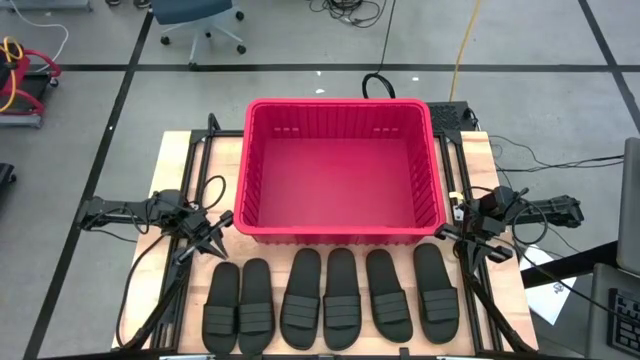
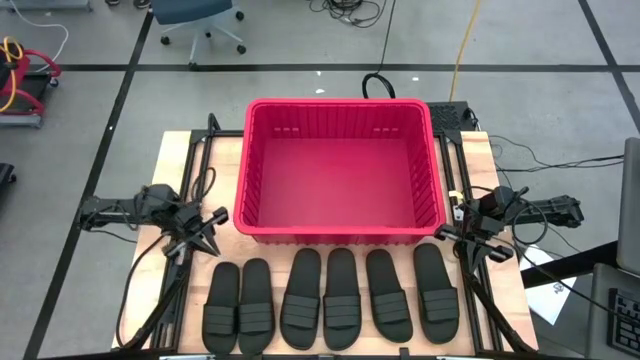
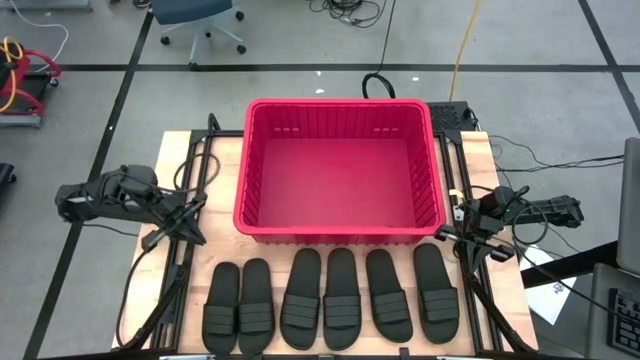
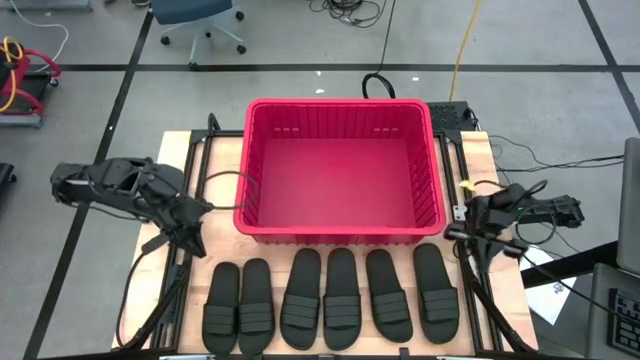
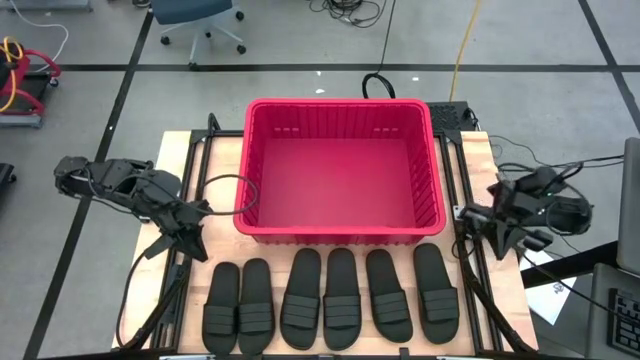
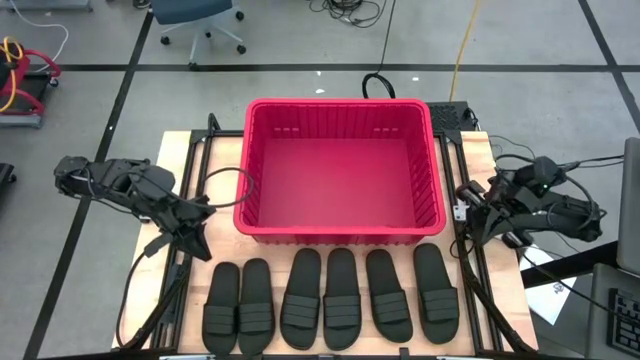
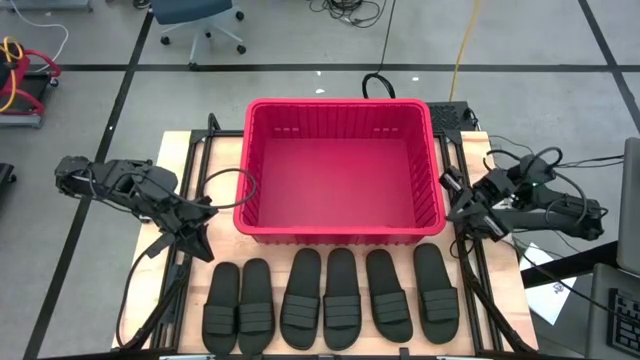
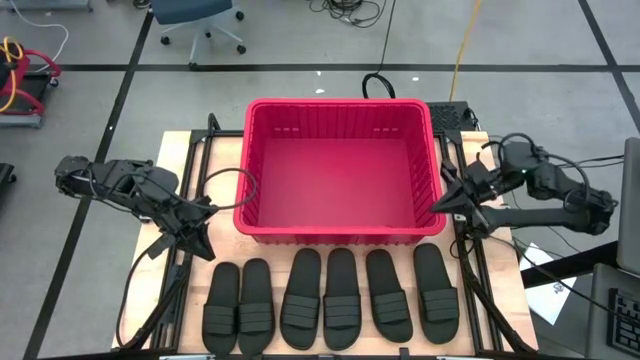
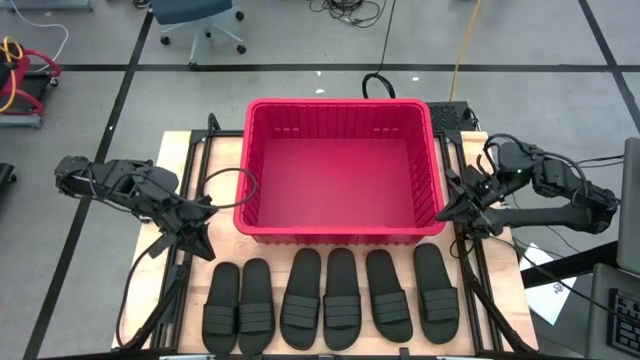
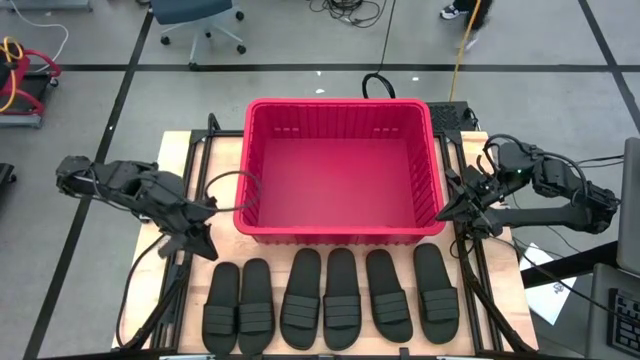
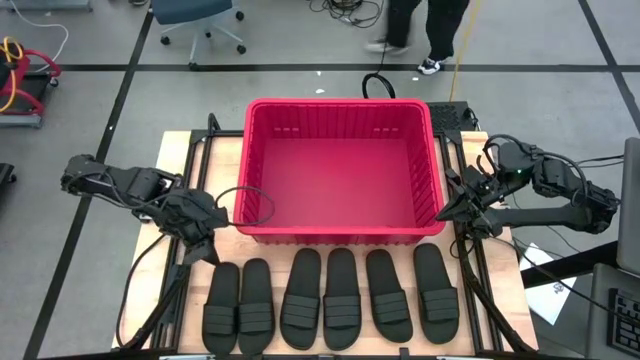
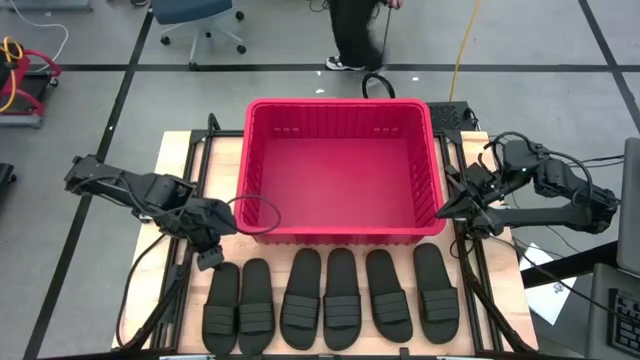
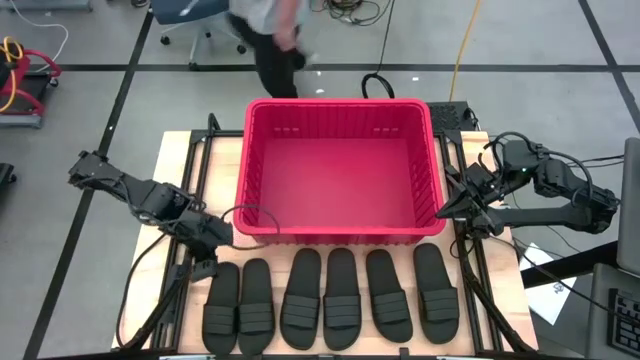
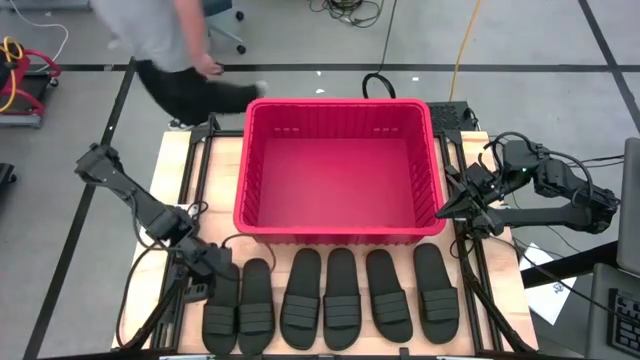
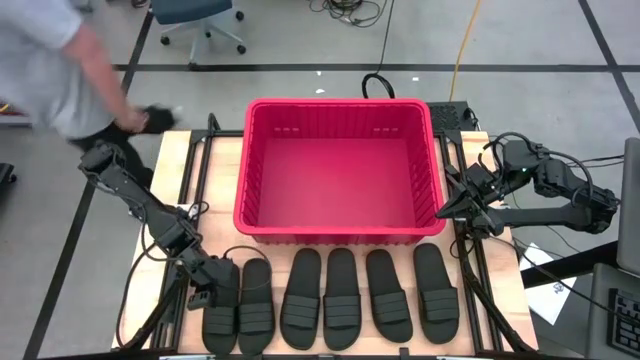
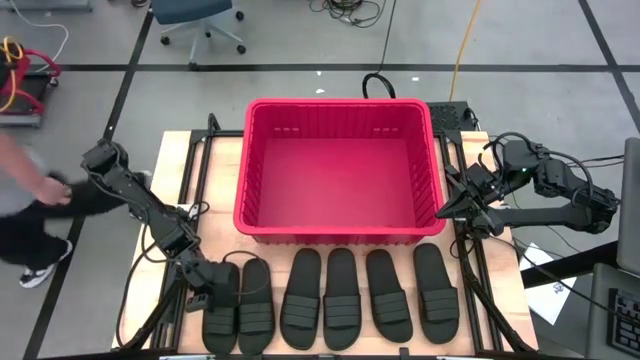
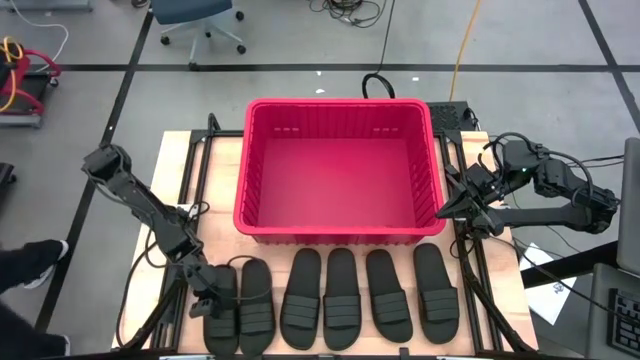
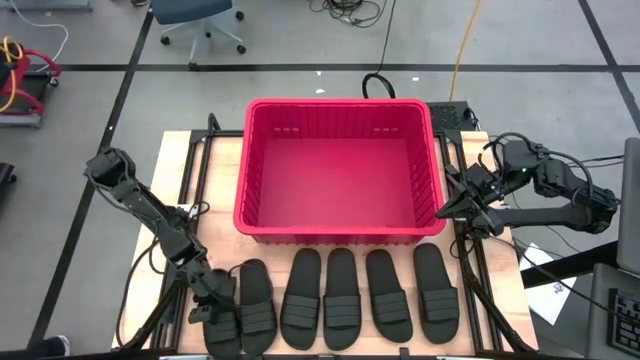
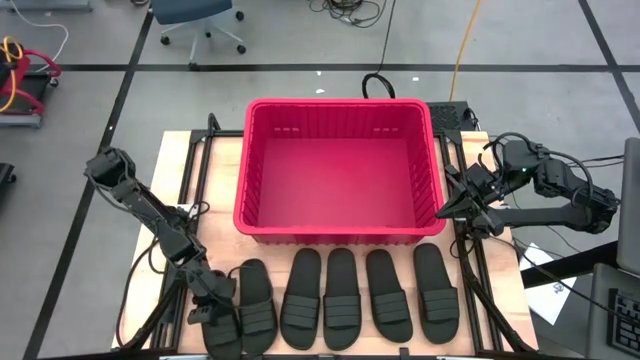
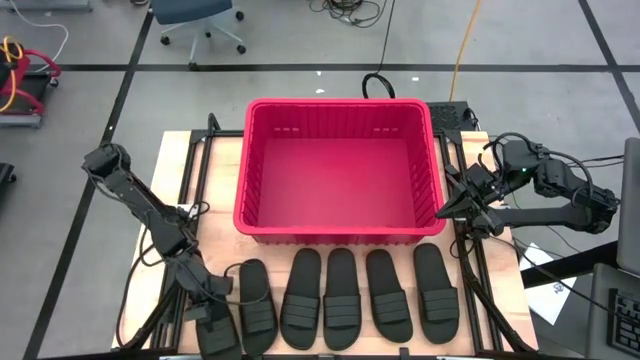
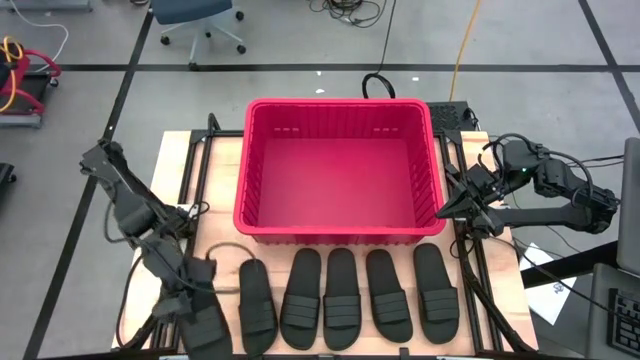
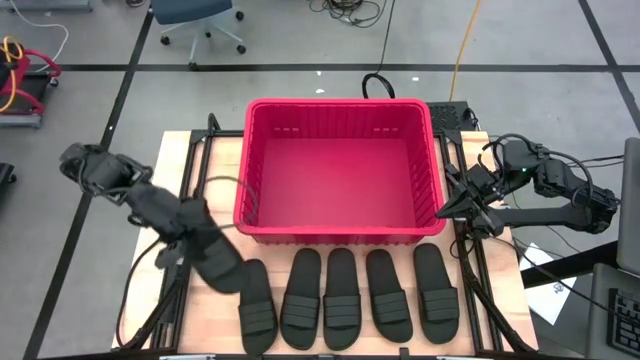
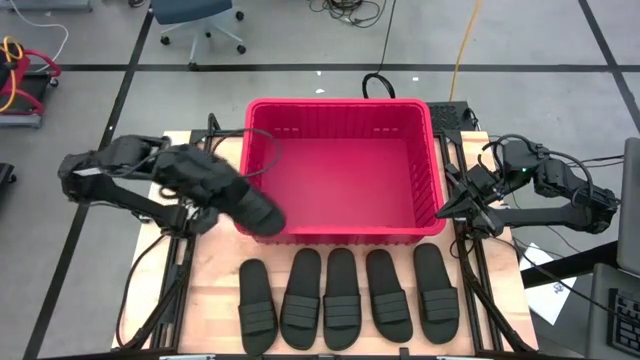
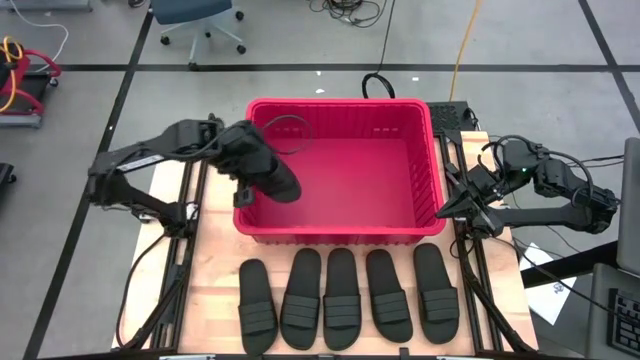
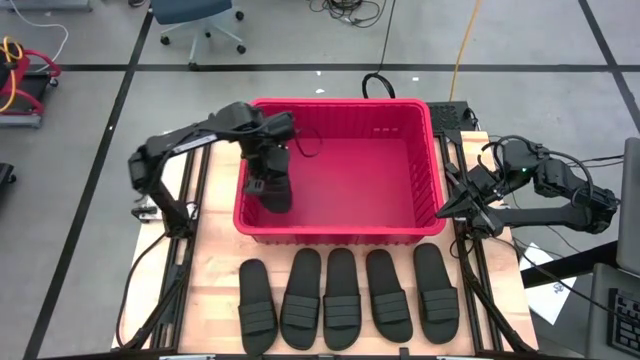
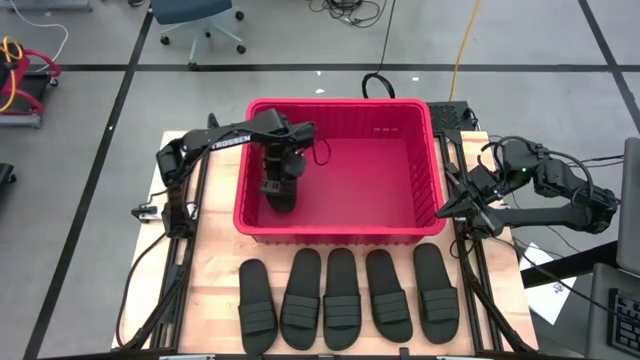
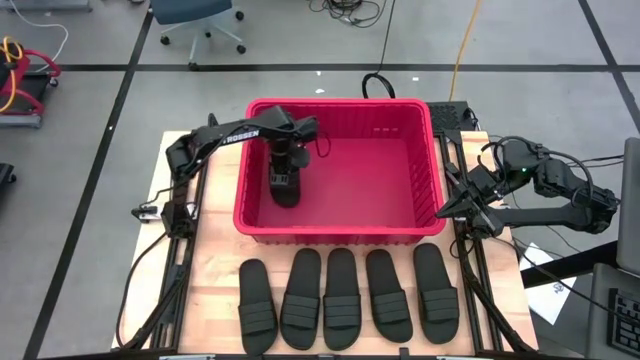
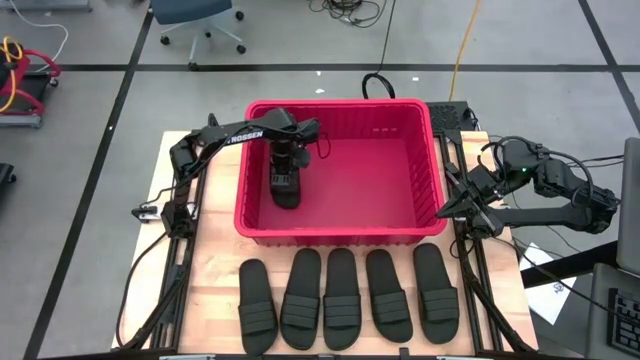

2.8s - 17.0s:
Task: Pick and place slides into bin
Put the black slide into the red bin

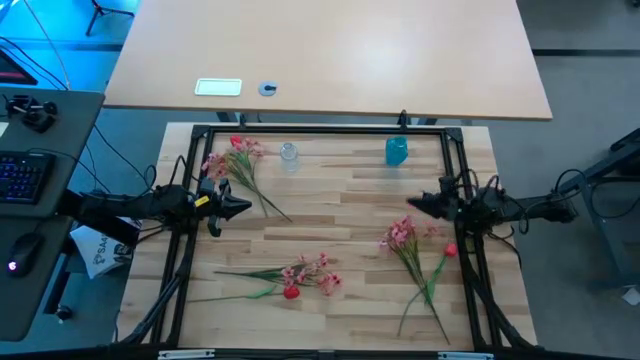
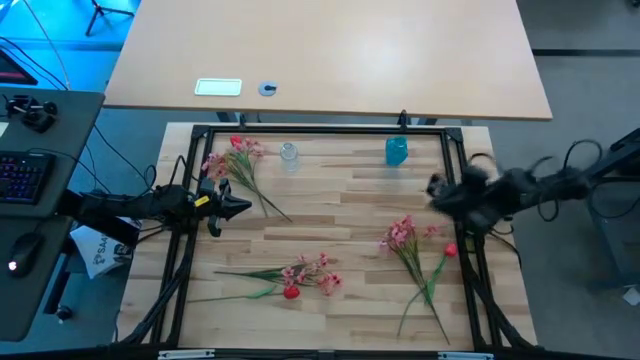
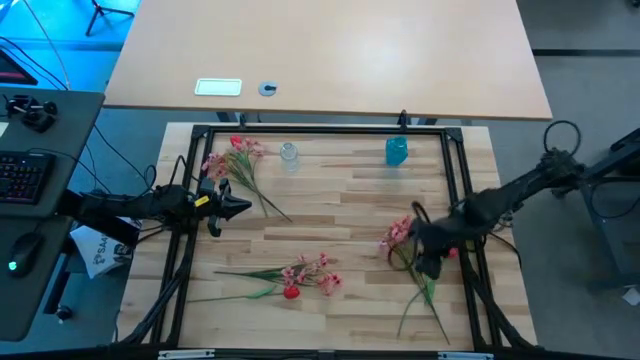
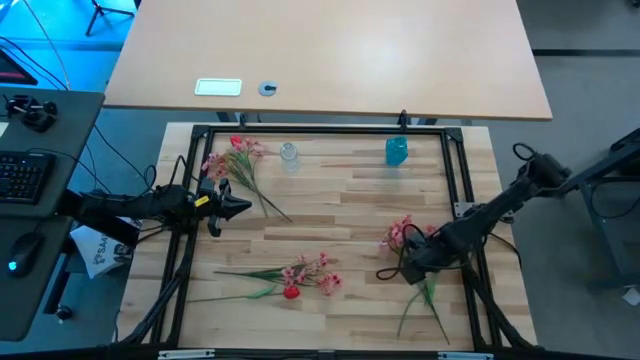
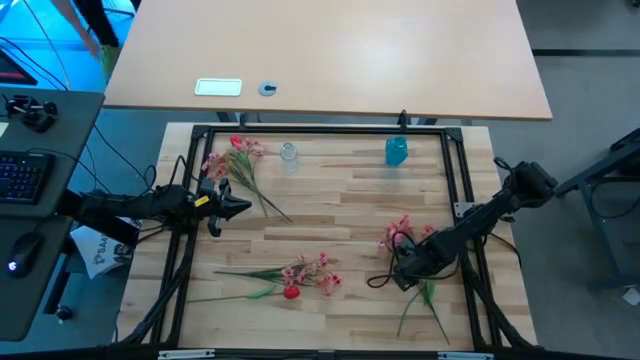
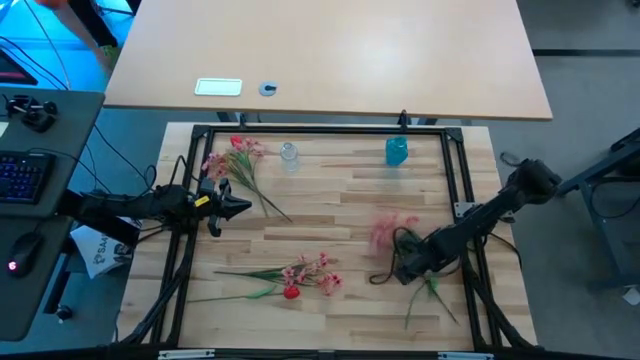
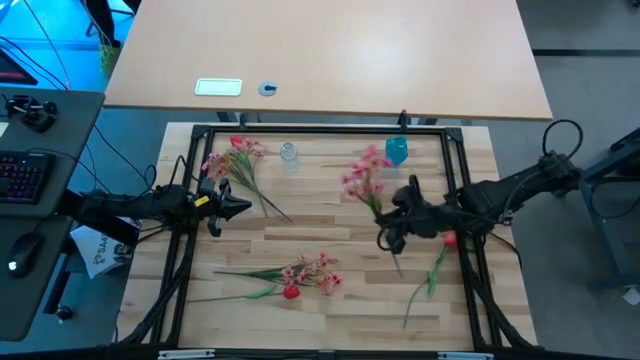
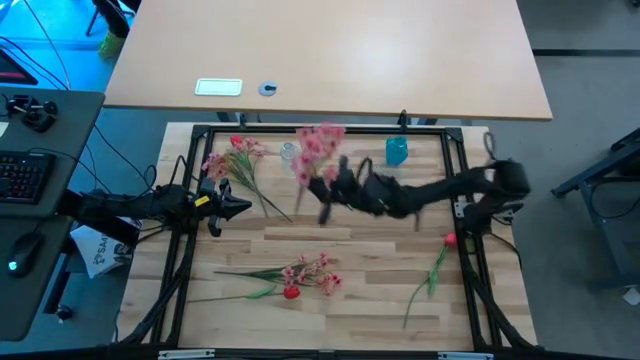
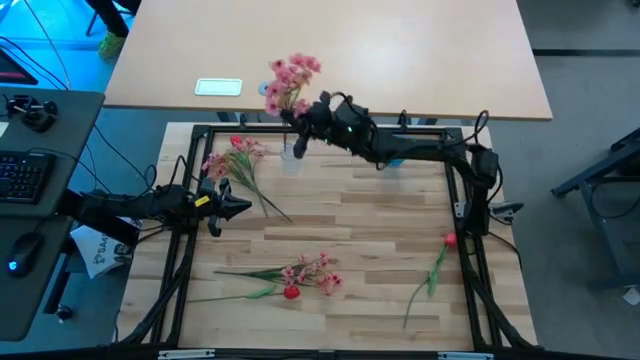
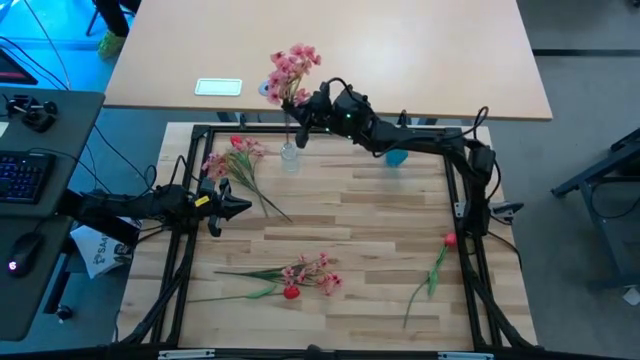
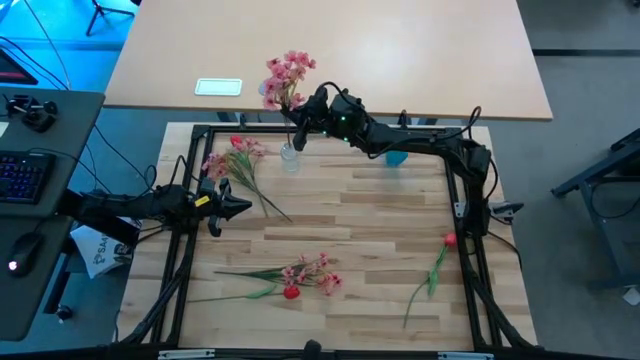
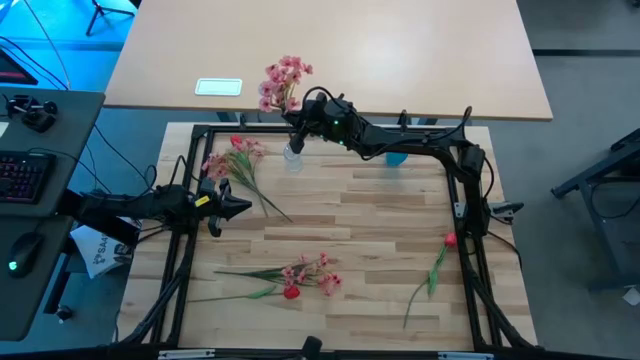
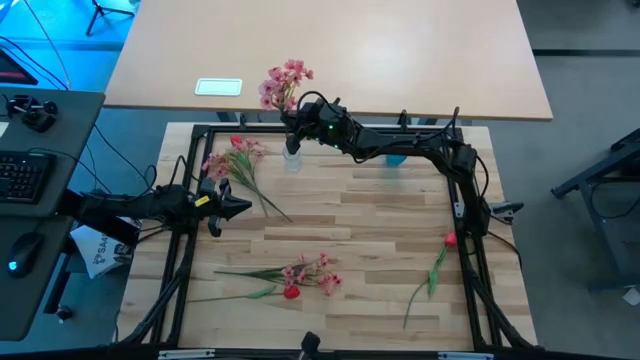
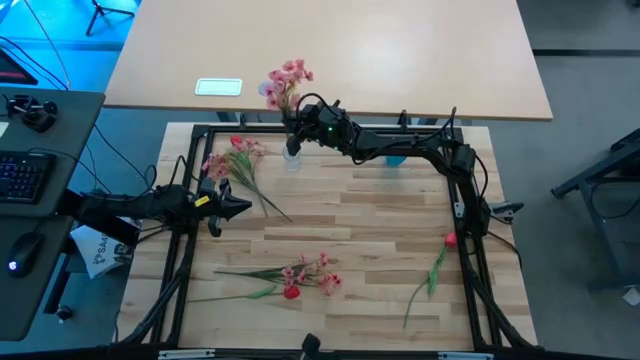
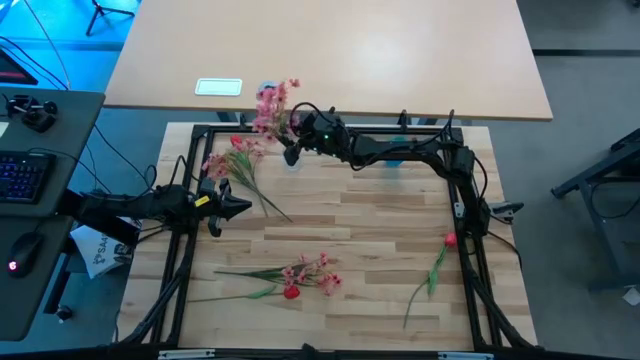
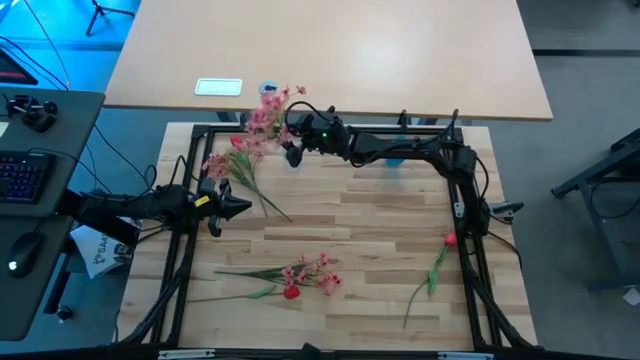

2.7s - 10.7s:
Task: Sort flowers into vase by color
Put the right pink flower into the transparent vase
